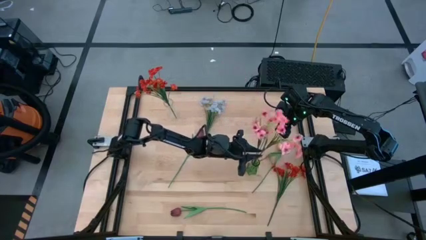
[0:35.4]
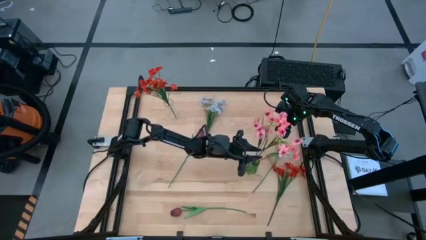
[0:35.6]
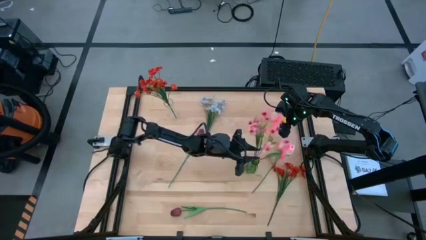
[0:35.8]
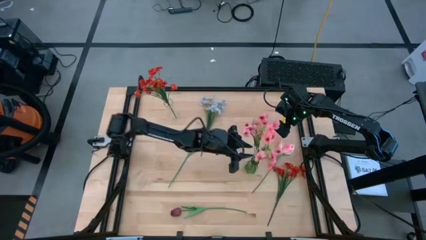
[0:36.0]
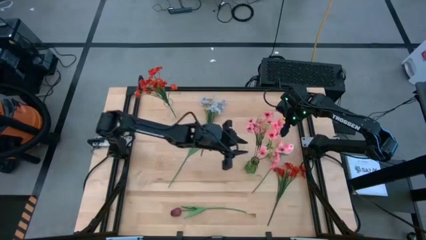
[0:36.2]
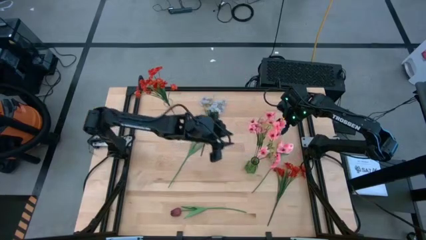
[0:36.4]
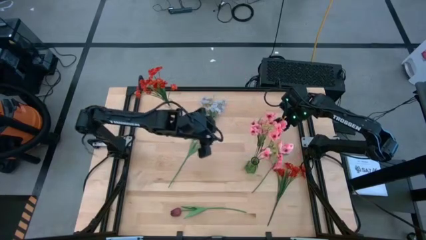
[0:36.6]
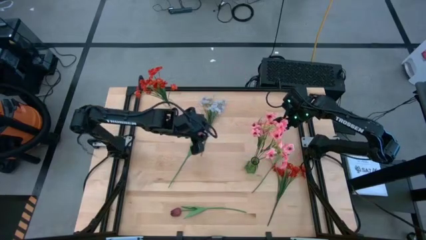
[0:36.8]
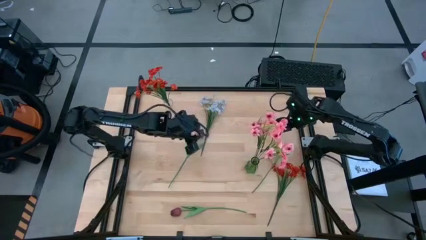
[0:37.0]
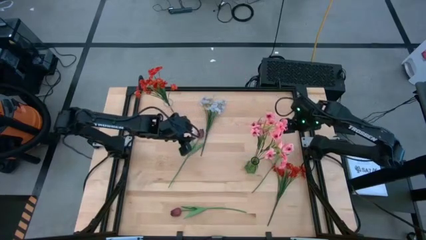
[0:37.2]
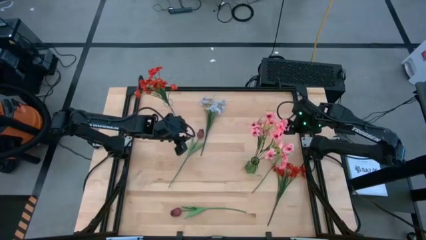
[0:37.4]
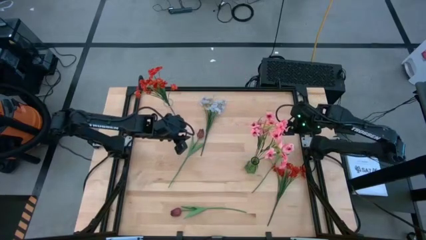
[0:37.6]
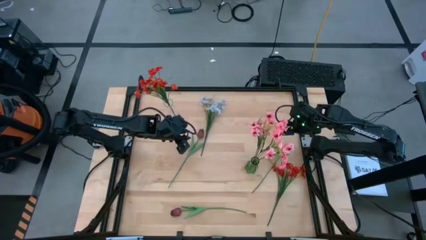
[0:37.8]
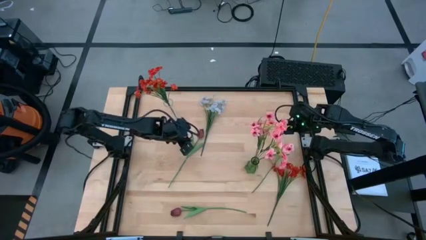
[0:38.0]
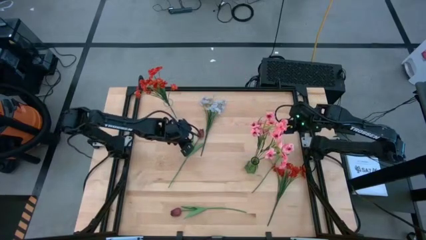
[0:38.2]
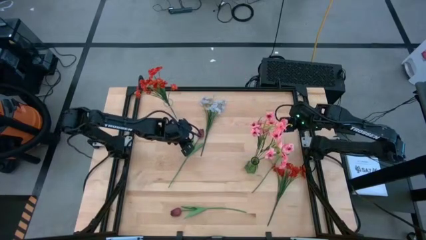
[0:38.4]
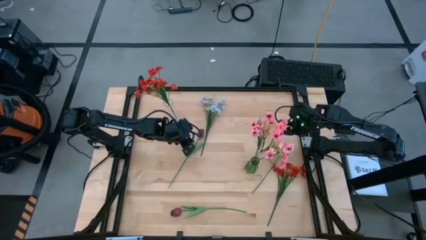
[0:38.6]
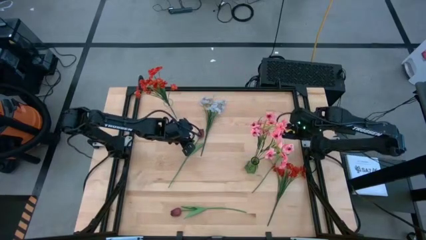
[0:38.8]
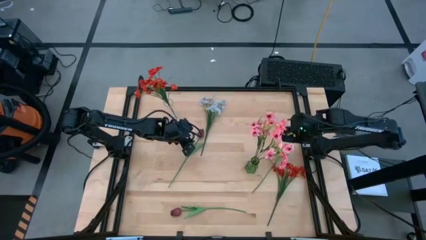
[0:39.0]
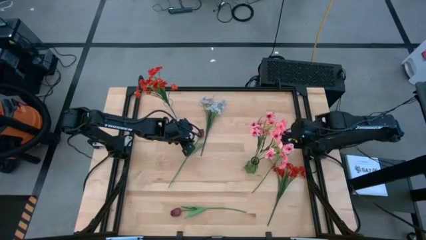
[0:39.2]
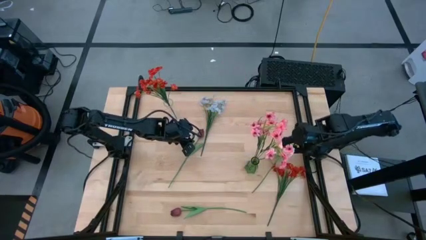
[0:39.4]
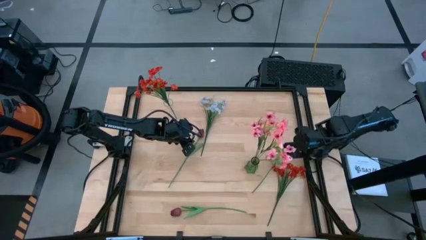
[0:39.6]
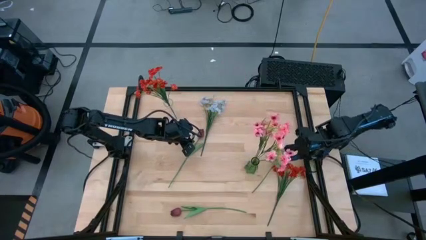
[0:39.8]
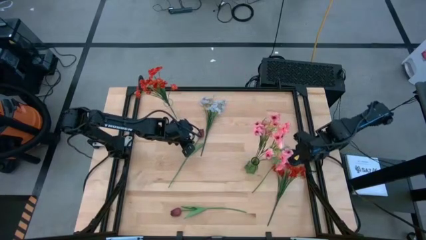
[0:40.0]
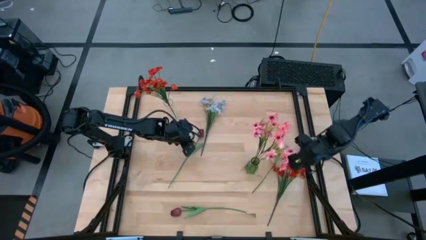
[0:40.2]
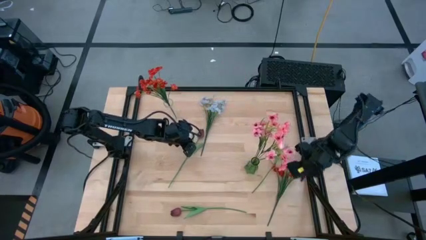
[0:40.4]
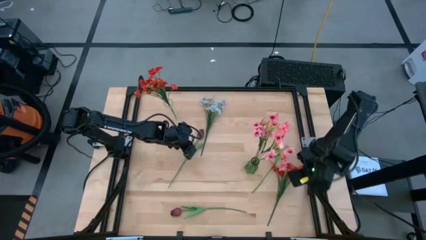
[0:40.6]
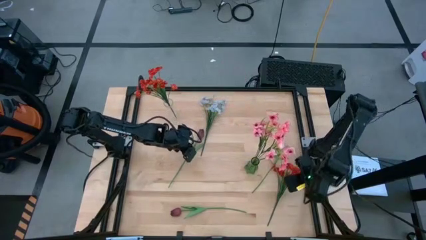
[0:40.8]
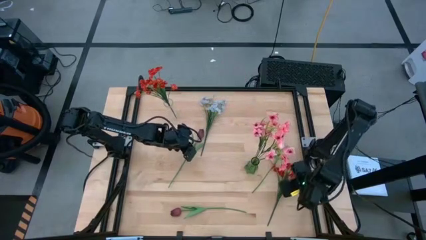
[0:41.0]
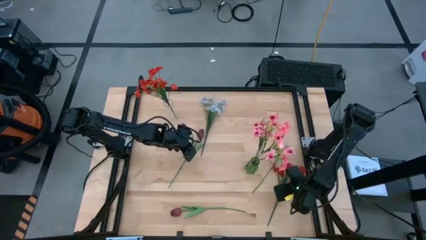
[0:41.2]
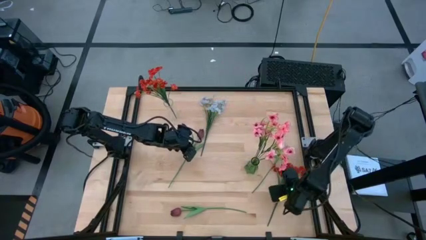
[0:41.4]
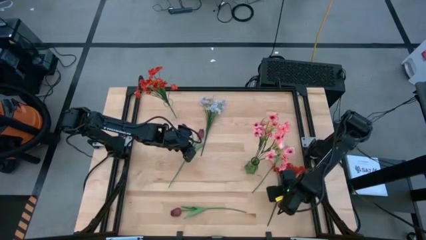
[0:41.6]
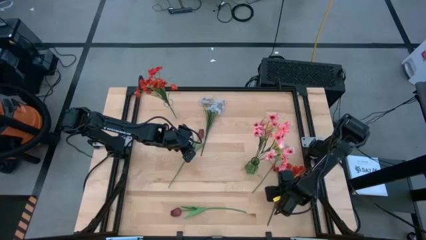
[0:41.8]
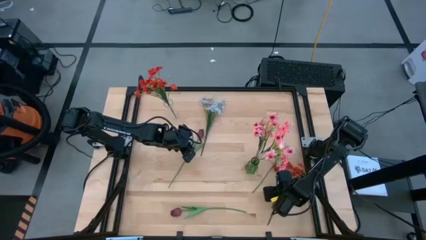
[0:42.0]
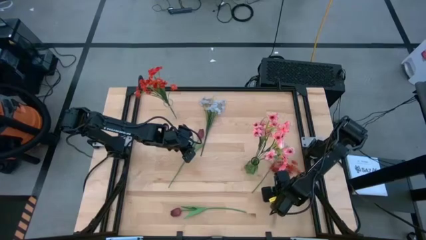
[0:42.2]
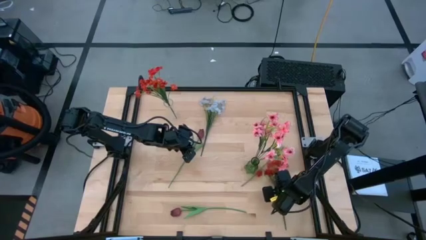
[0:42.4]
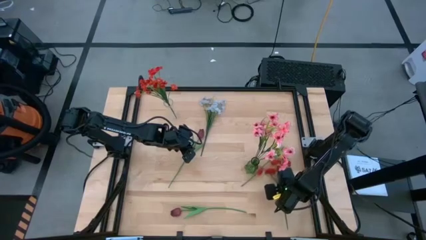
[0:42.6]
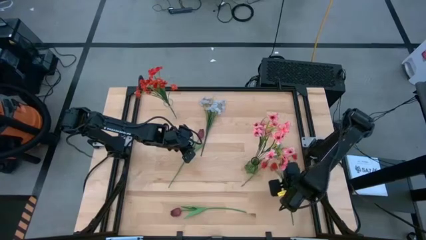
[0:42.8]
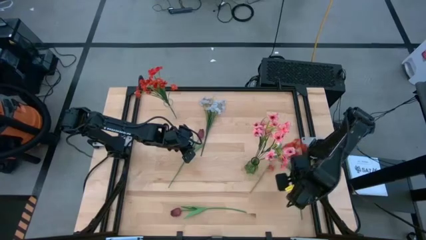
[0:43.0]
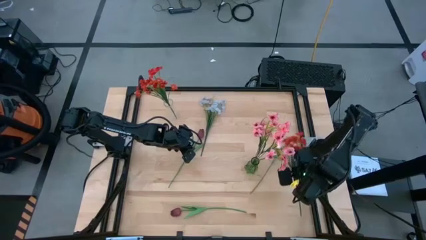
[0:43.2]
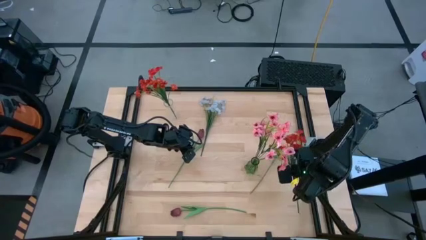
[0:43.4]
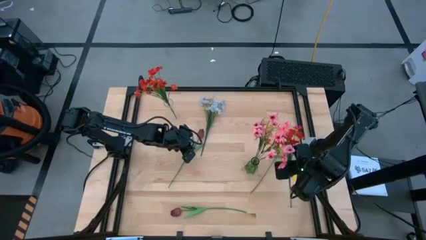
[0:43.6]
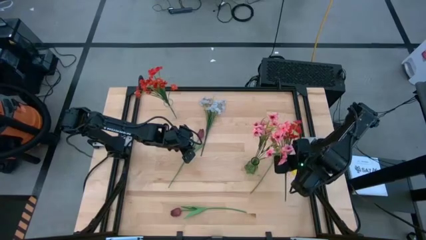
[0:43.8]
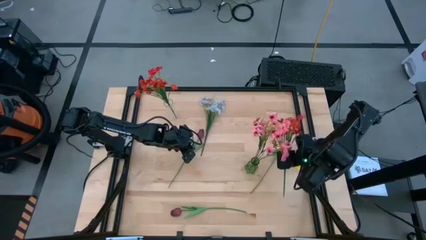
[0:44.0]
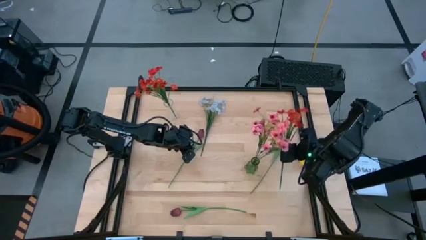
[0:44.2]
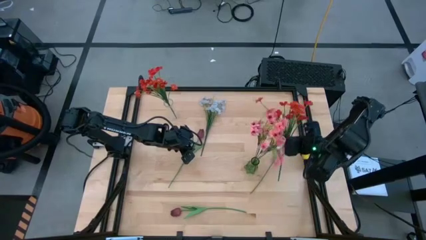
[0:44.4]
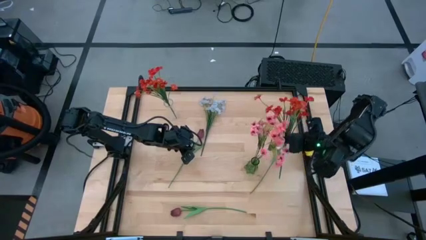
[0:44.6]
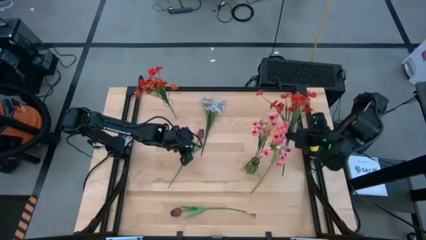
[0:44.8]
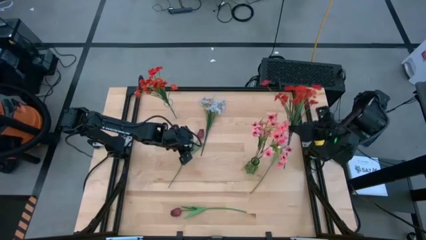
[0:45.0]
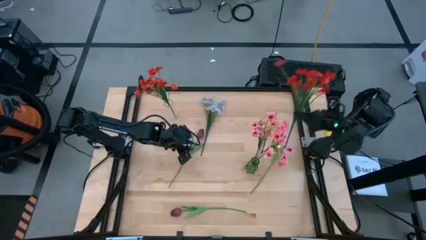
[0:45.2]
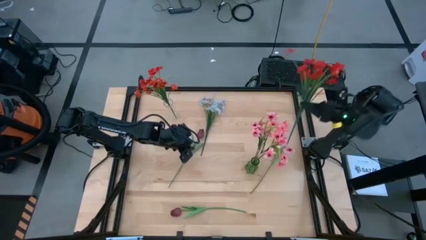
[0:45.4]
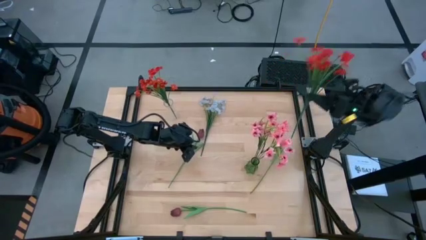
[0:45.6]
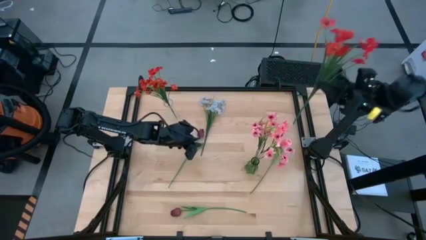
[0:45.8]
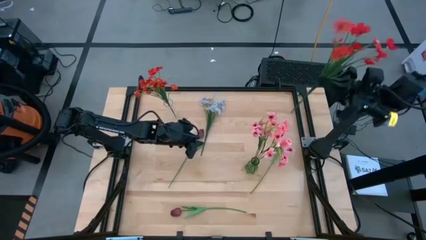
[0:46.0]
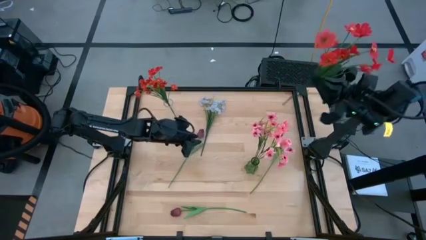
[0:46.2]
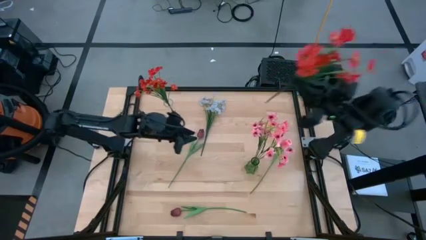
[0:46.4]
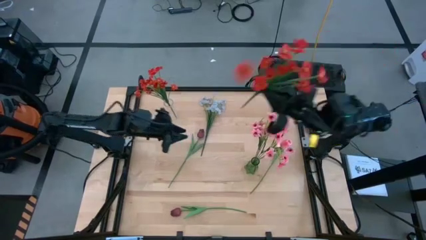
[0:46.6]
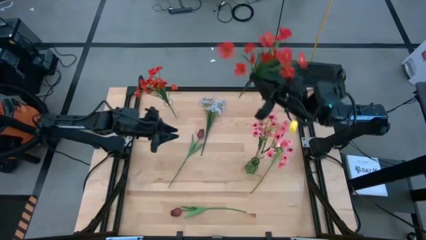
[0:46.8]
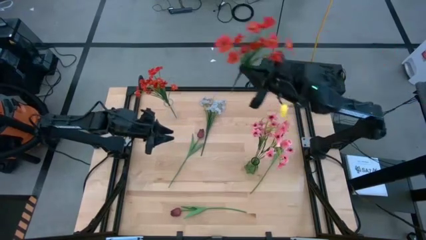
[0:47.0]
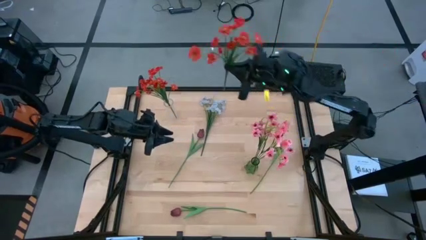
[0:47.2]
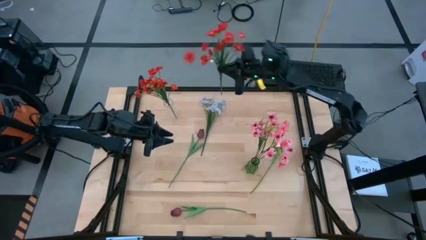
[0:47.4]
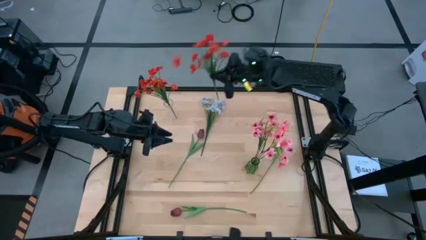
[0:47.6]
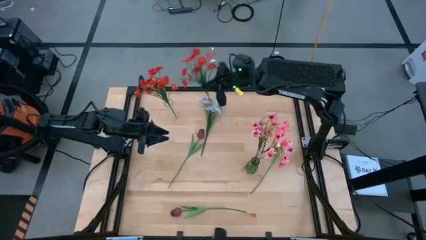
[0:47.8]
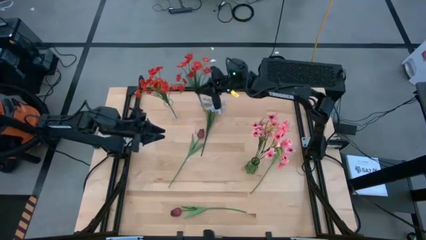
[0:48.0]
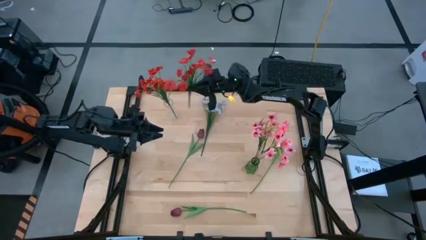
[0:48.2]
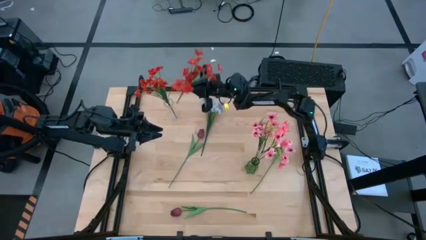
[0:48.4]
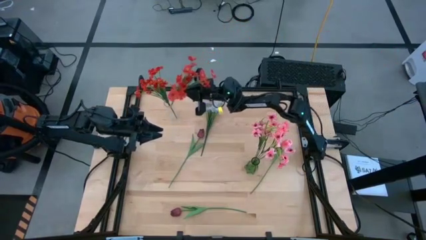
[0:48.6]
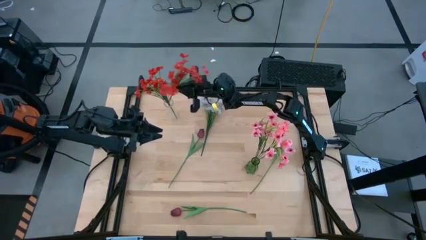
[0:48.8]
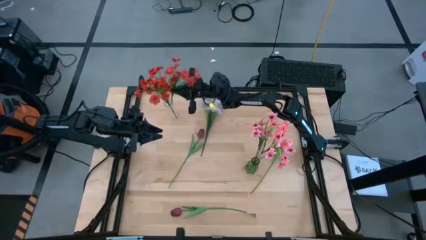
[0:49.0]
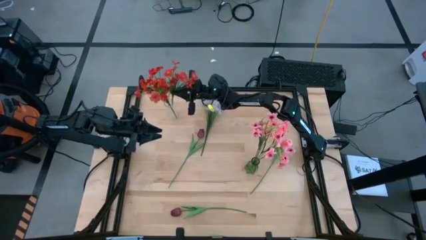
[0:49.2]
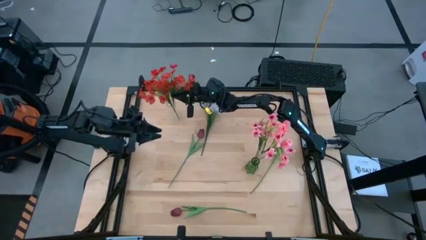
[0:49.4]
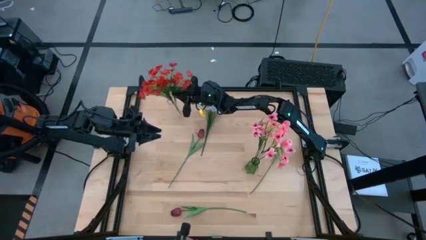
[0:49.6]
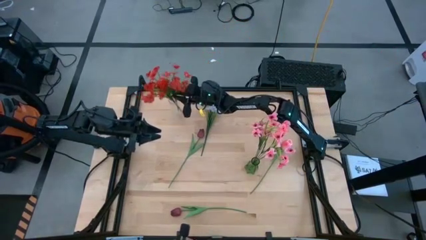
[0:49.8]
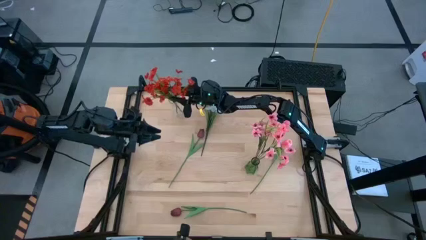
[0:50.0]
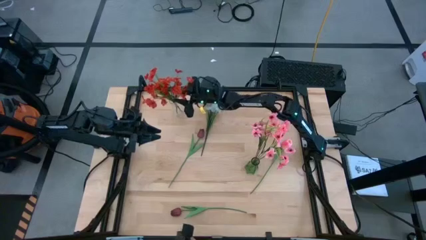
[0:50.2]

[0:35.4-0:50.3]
Task: Sort flowers into vase by color
Put the red flowers into the transparent vase

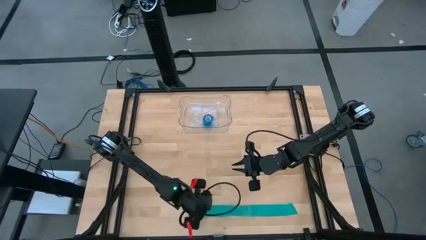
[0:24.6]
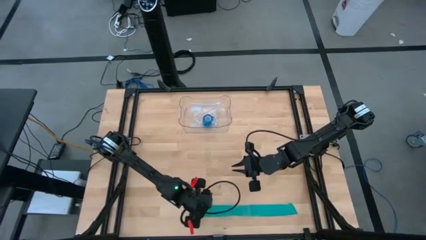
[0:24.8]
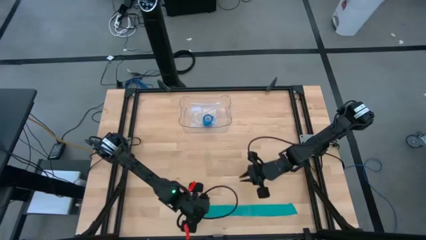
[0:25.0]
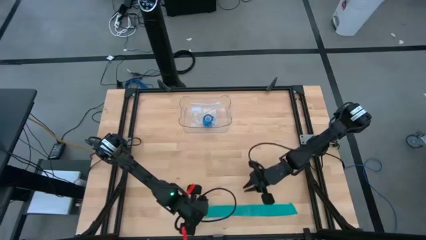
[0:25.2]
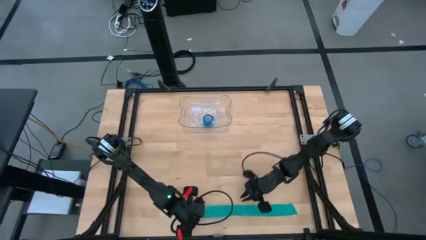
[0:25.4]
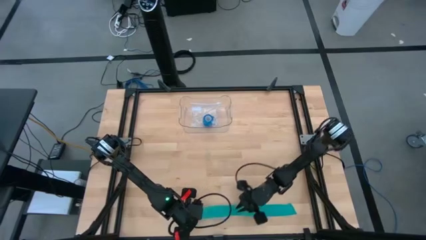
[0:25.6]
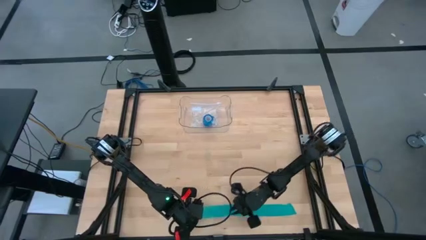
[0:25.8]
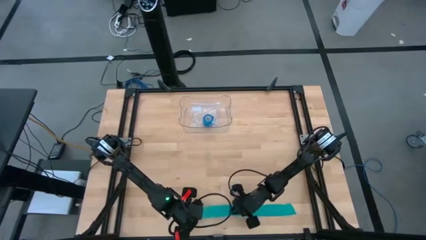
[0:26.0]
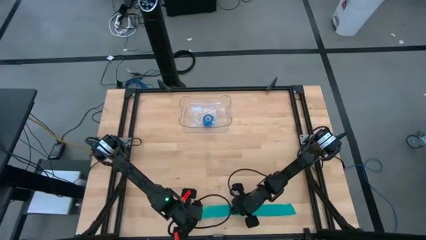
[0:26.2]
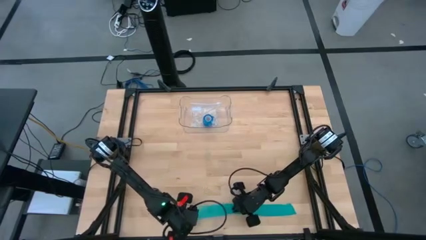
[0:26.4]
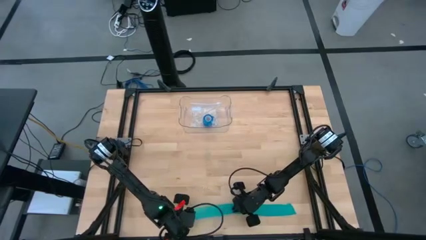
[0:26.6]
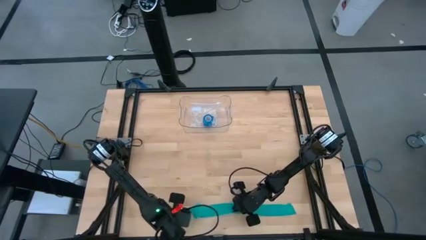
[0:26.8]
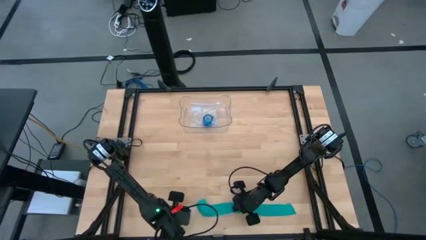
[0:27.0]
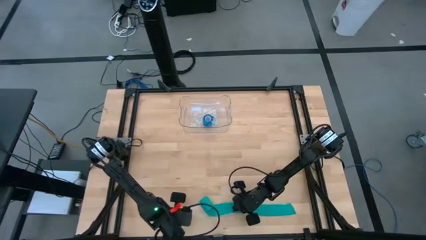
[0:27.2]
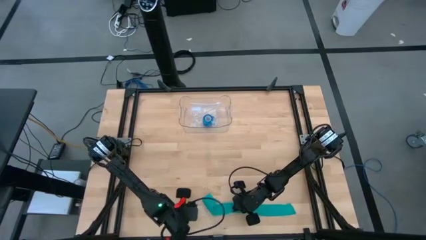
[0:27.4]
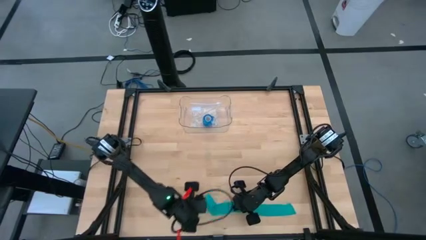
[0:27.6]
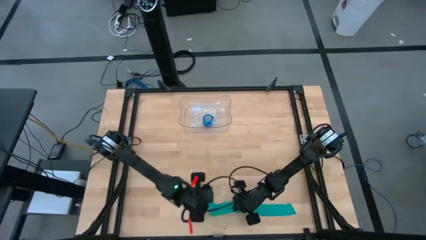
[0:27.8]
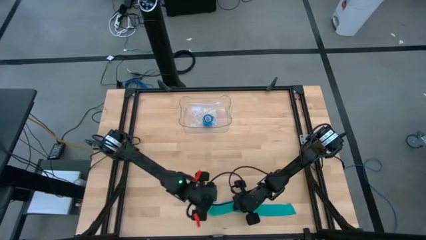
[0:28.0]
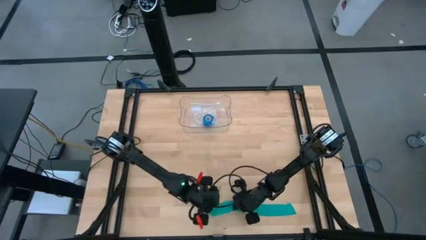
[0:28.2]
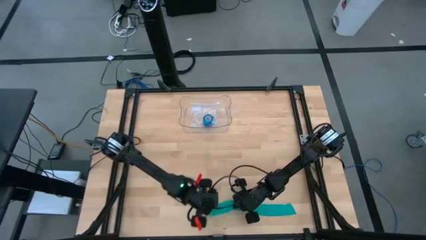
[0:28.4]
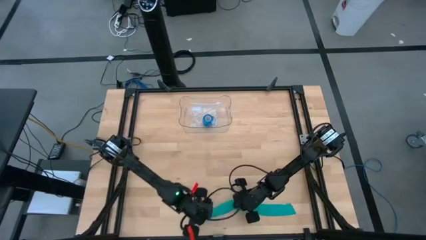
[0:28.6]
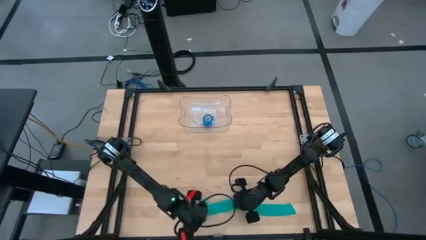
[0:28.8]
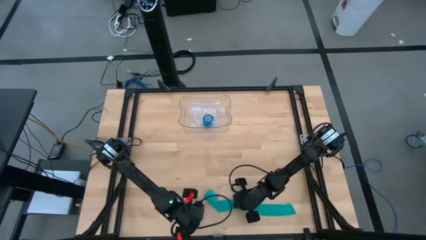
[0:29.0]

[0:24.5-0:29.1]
Task: Roll bandage
Roll the green bandage
